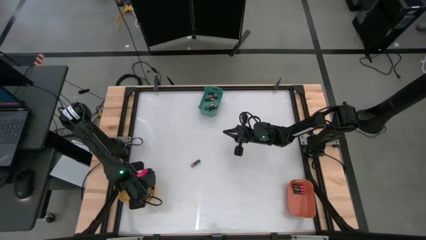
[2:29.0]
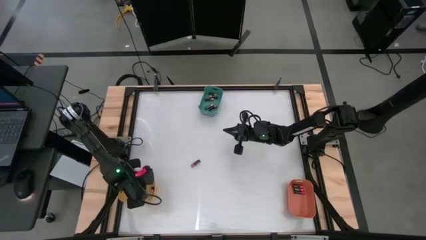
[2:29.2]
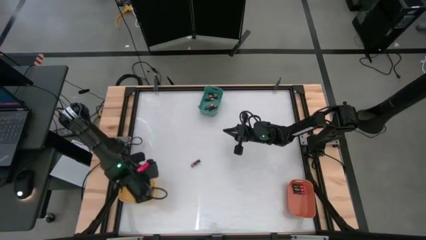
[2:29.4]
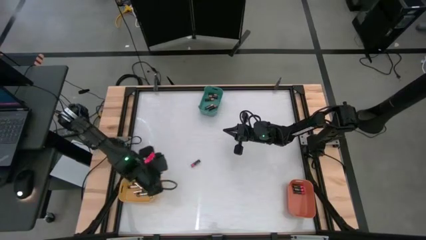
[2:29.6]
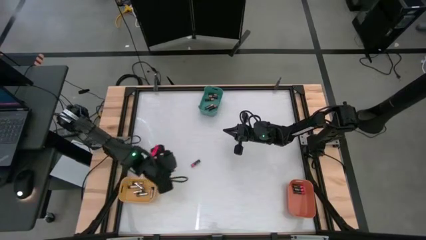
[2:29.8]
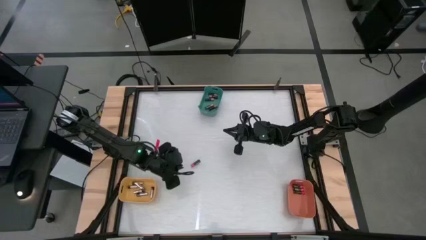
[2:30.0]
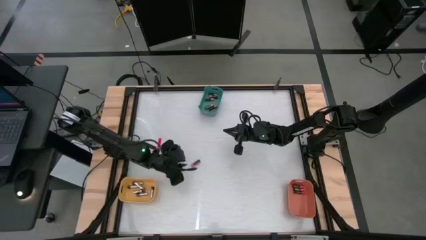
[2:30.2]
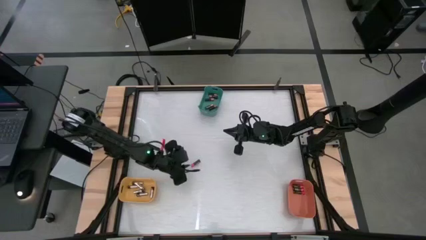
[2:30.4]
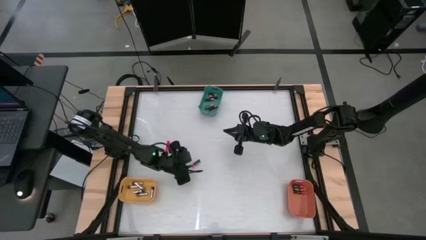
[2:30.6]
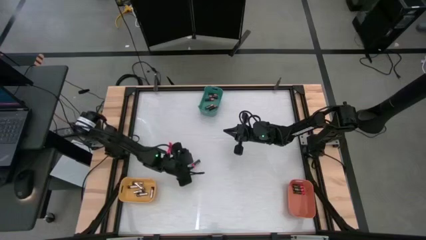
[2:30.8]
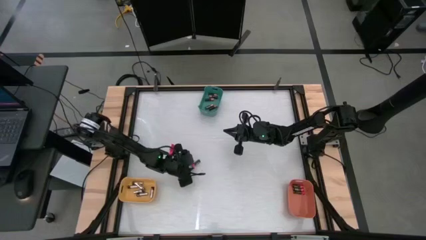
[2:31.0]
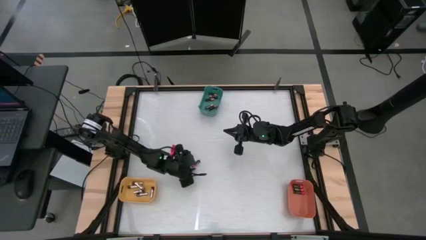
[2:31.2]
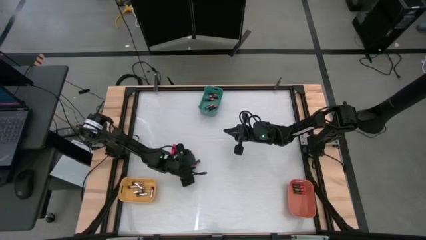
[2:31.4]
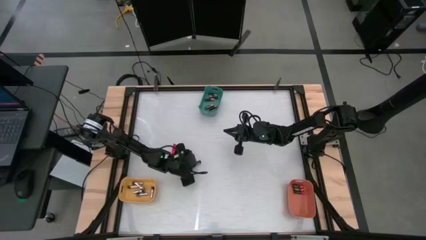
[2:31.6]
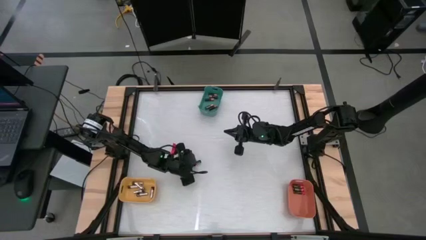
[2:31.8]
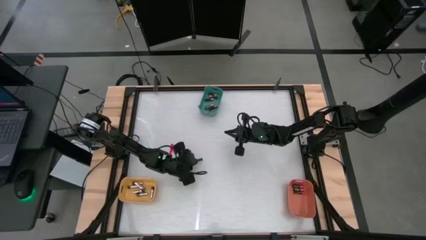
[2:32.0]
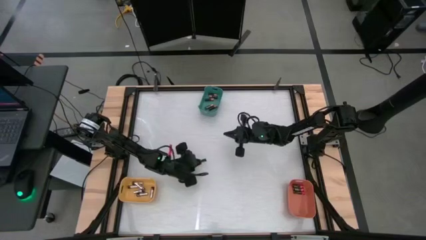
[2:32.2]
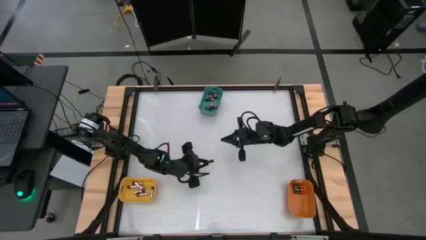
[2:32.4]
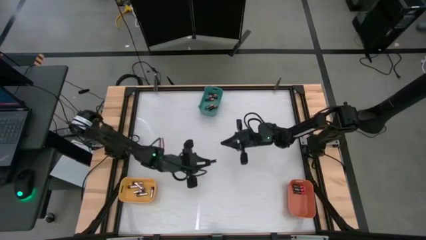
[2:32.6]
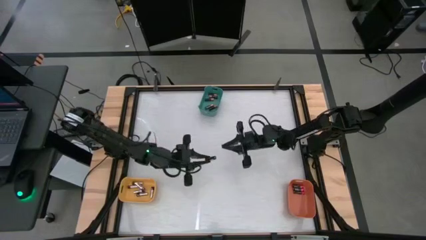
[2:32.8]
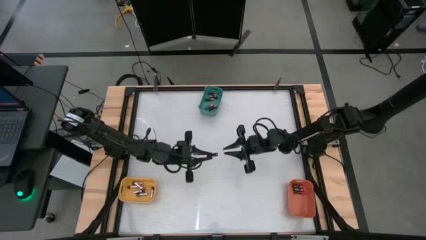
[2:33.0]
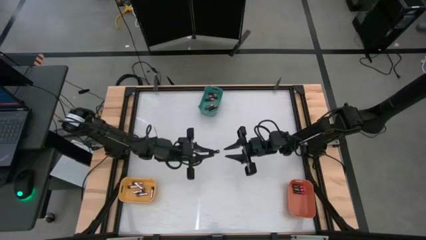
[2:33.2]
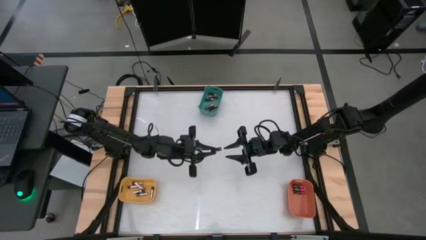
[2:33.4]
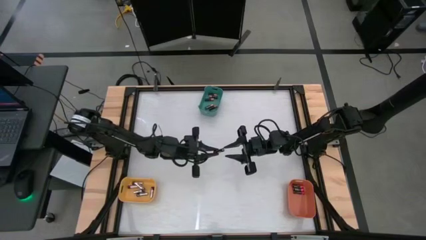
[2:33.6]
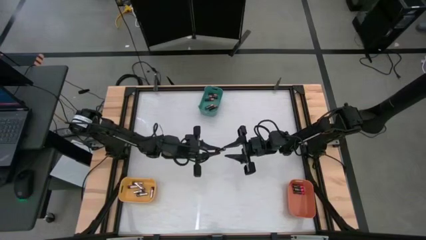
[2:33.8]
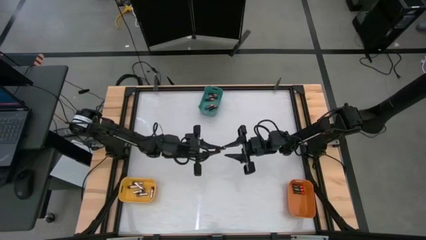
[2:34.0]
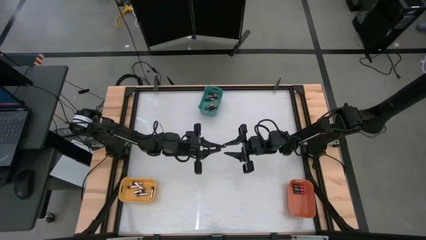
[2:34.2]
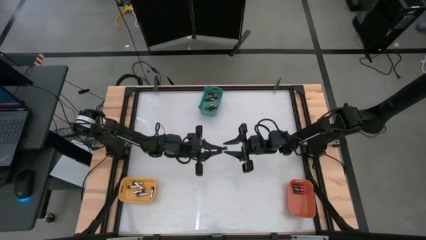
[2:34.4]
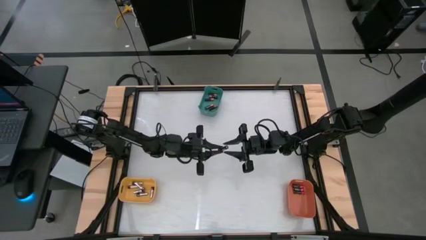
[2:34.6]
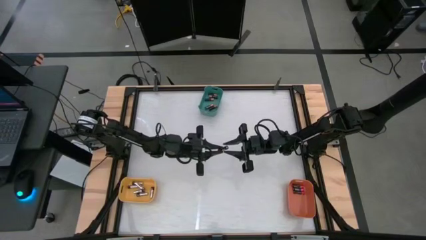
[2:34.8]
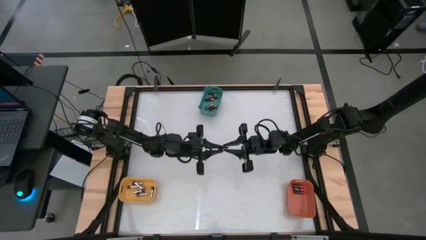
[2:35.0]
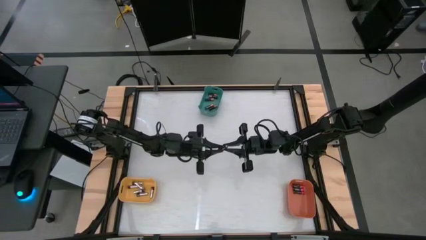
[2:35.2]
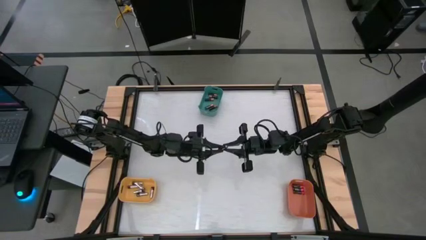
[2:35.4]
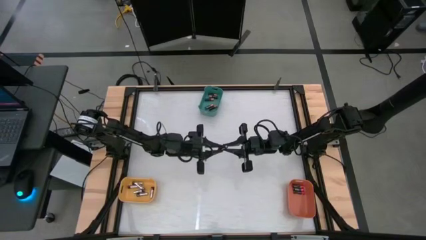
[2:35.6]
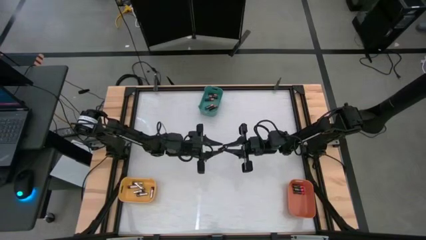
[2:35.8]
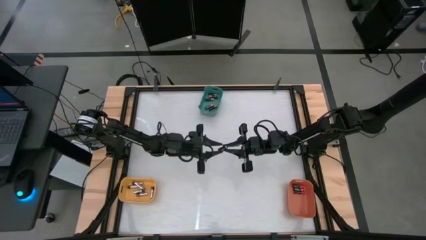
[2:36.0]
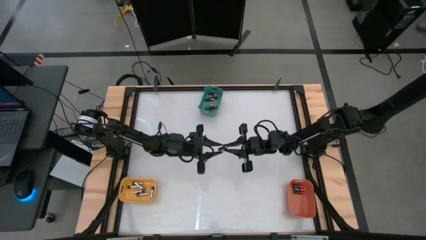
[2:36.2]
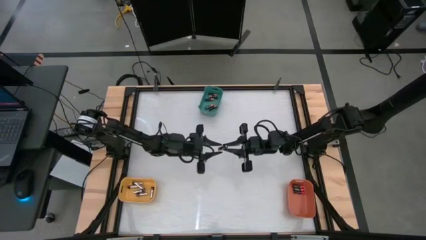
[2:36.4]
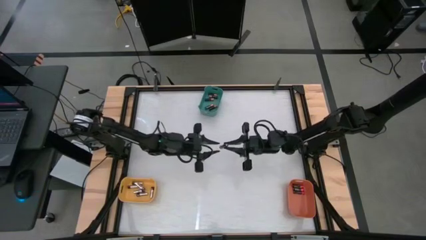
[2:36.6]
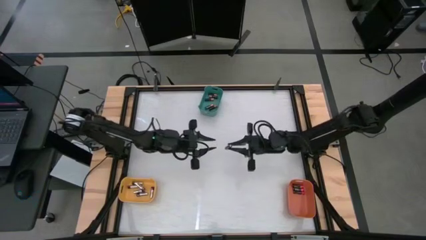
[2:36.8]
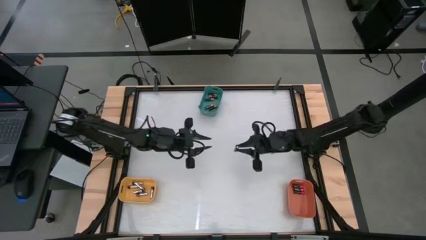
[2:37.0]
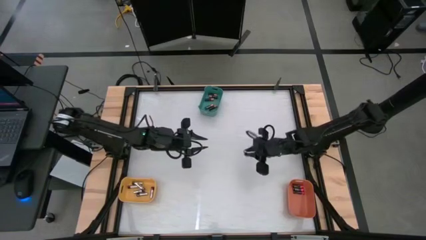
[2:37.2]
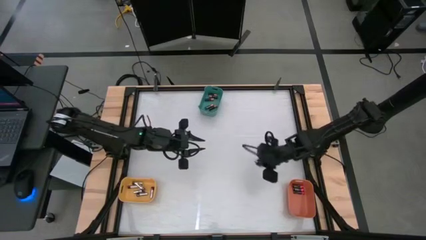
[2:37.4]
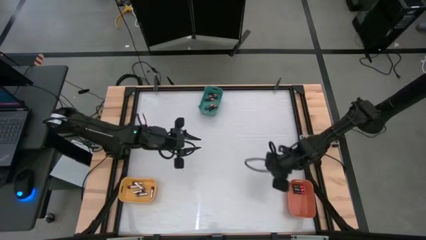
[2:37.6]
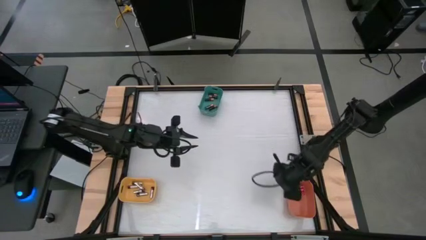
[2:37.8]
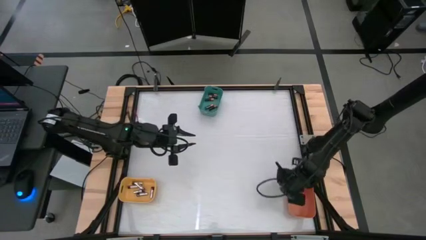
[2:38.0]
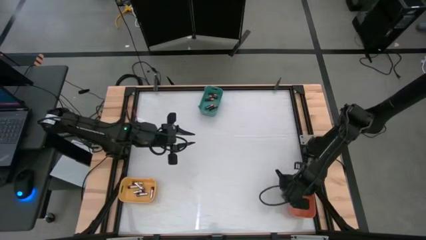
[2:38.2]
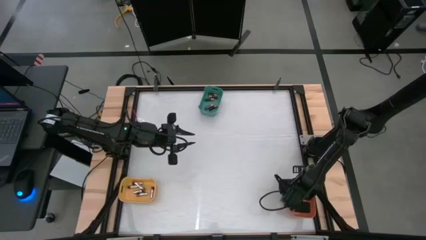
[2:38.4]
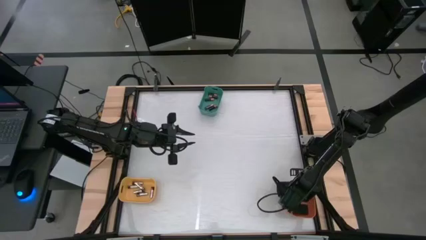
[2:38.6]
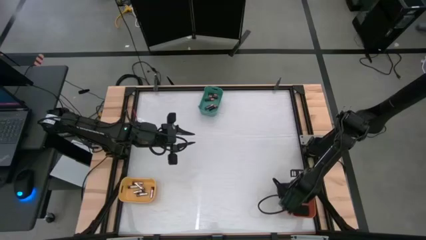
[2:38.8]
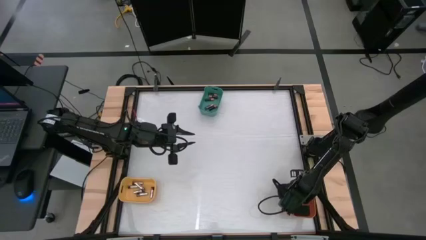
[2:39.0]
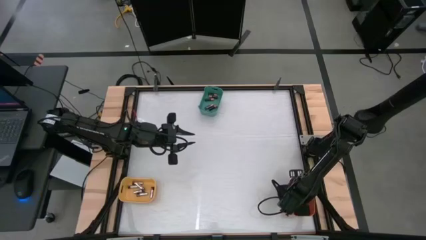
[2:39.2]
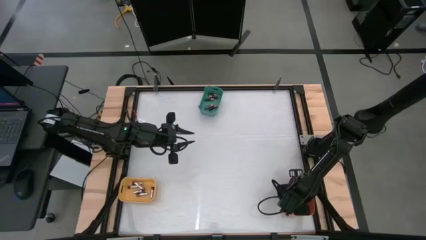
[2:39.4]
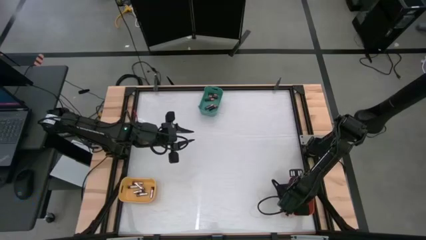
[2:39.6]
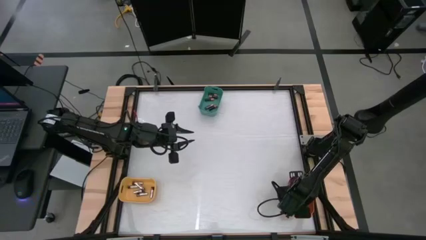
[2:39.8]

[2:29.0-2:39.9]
Task: Sort batteries
Put the red battery into the orange bin

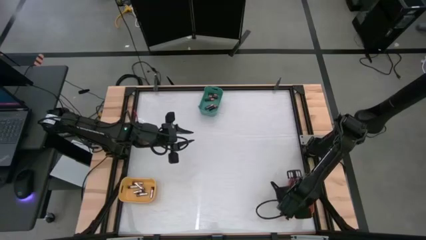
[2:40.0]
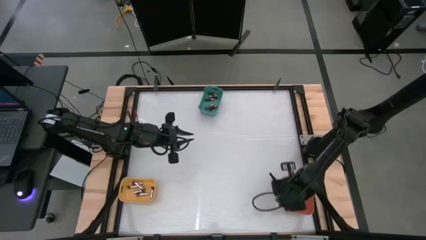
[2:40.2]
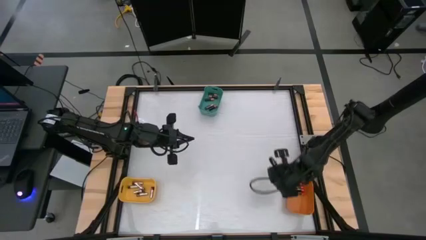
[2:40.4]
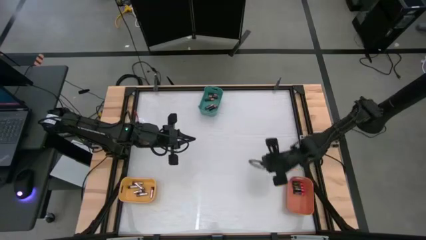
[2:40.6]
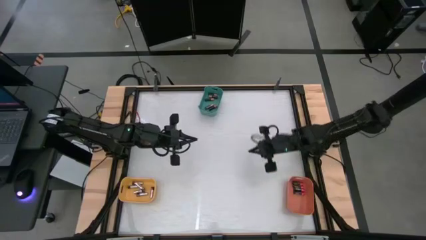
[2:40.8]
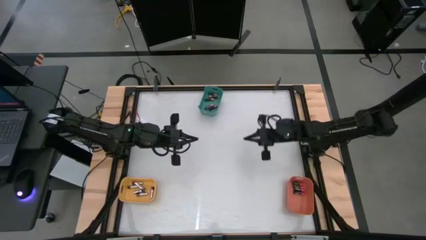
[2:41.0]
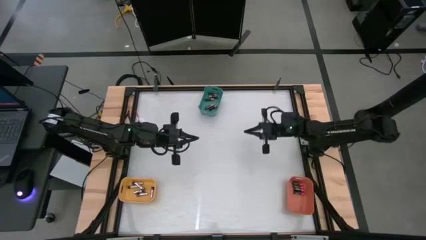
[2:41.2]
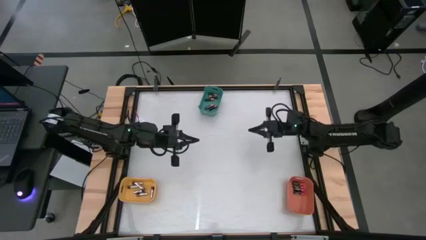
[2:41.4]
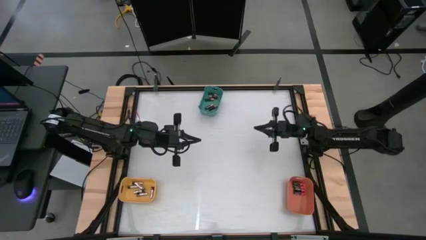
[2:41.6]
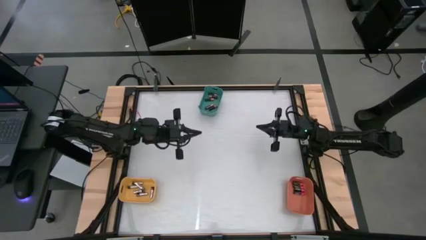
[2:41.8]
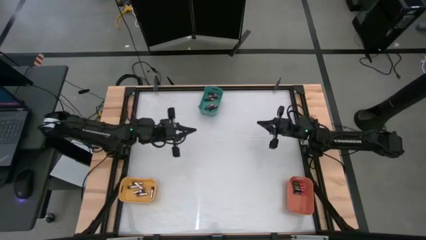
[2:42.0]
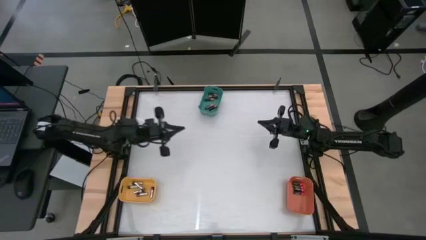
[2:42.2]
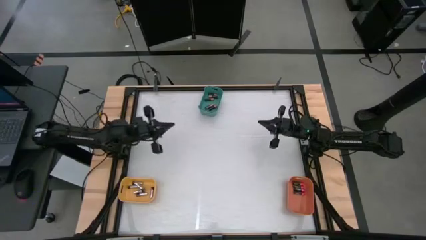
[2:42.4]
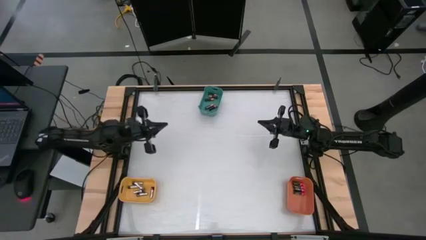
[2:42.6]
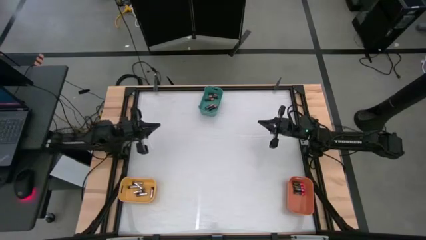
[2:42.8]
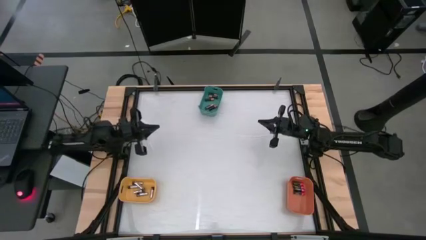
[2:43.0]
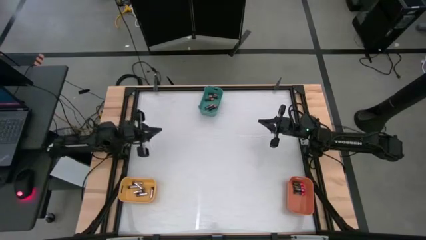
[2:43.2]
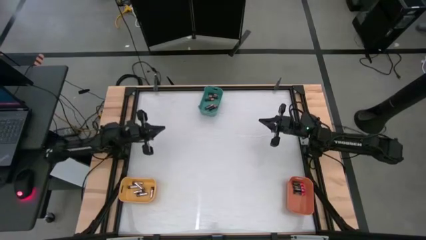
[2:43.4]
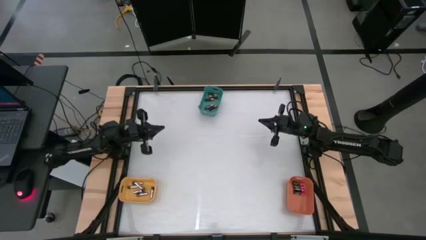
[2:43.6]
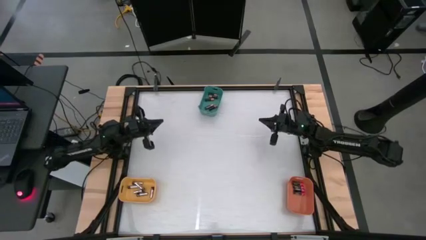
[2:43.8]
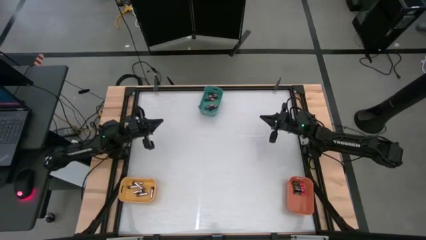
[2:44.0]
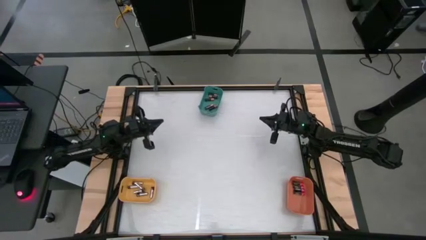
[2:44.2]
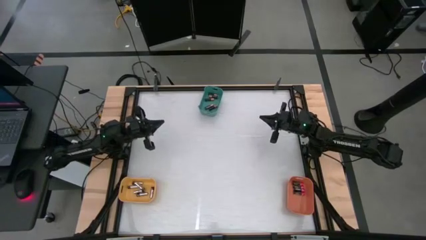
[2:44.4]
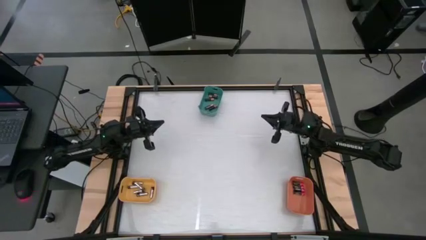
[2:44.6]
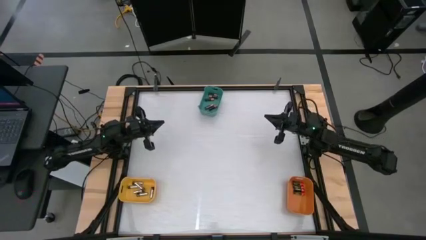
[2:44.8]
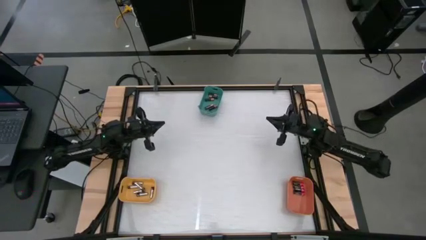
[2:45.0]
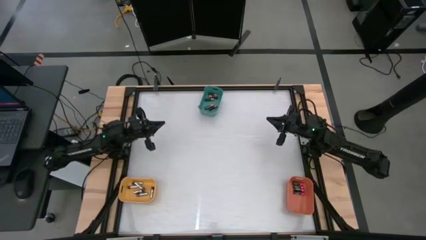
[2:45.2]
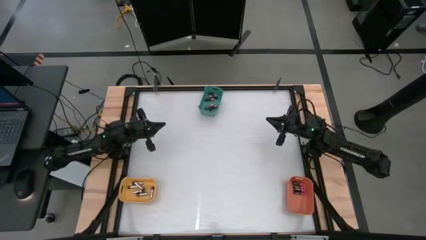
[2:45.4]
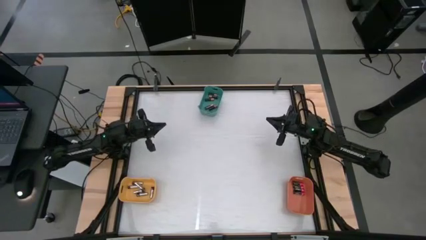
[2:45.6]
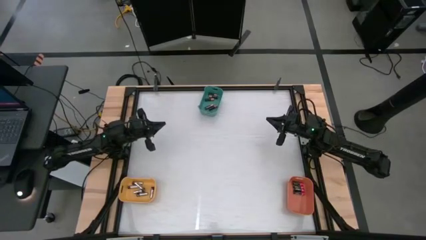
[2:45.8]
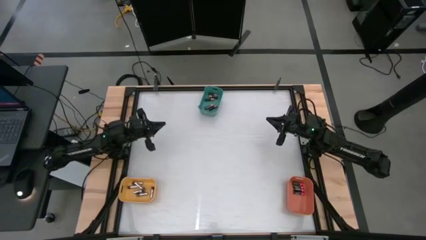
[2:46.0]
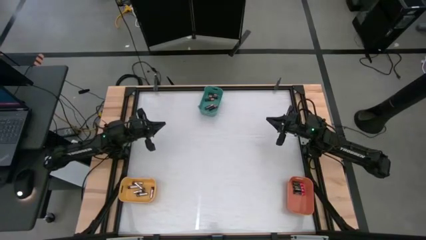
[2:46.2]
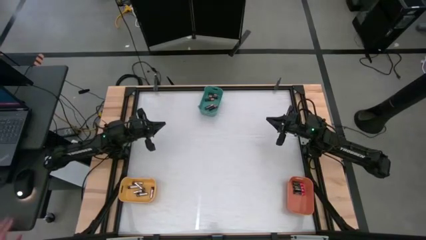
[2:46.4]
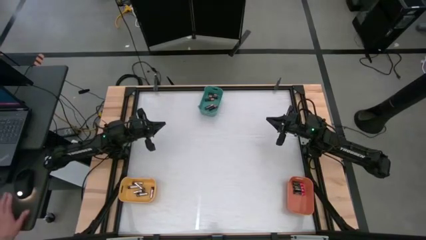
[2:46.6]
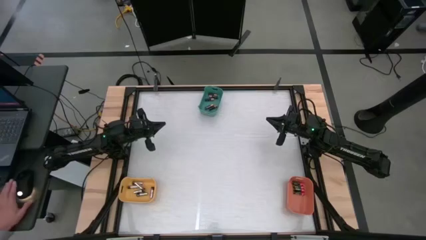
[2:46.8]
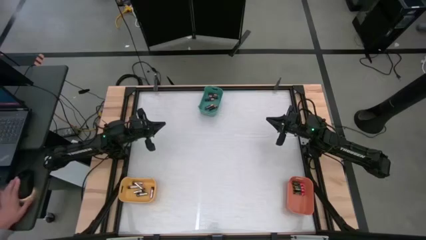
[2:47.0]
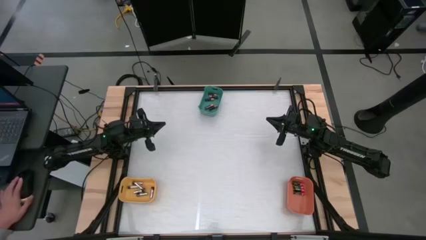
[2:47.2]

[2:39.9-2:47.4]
Return to Home Position
